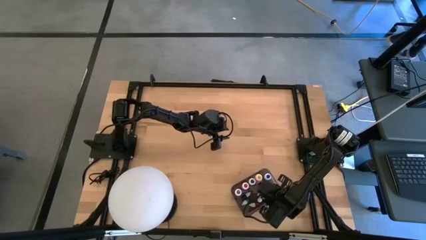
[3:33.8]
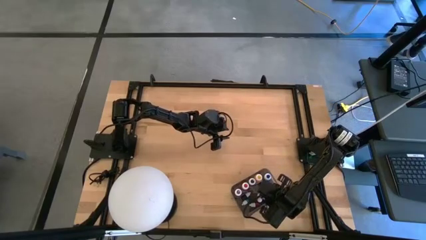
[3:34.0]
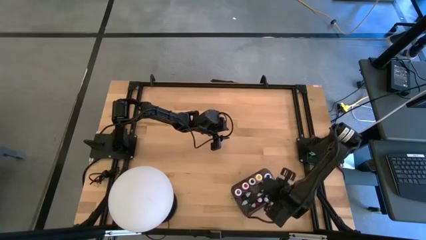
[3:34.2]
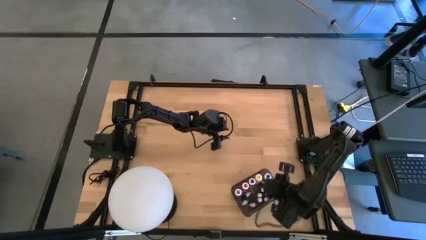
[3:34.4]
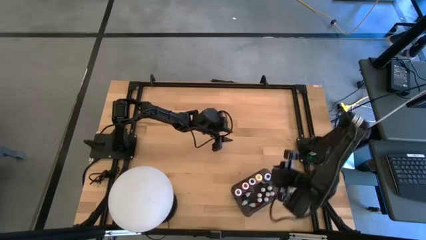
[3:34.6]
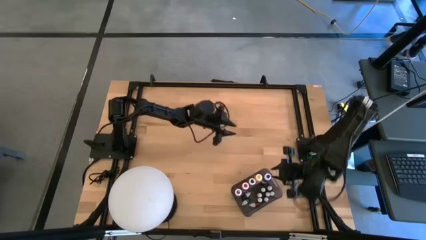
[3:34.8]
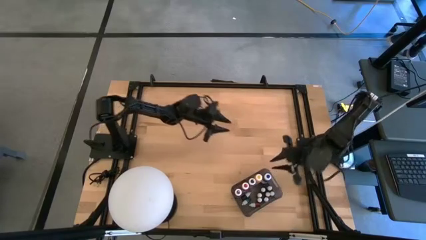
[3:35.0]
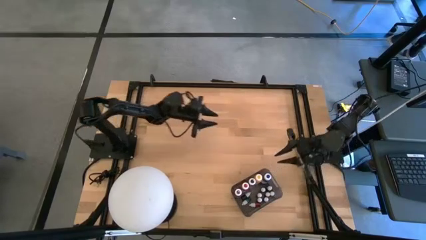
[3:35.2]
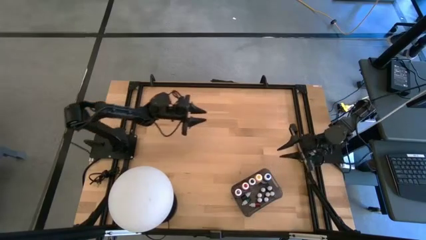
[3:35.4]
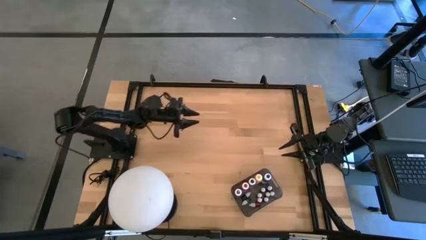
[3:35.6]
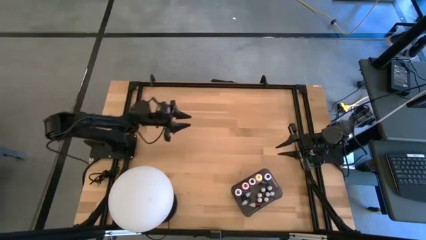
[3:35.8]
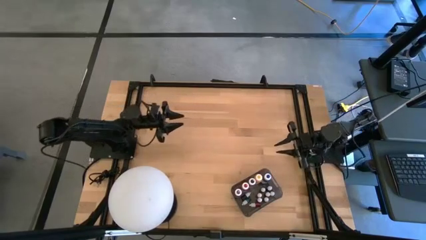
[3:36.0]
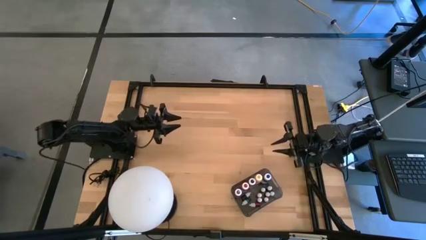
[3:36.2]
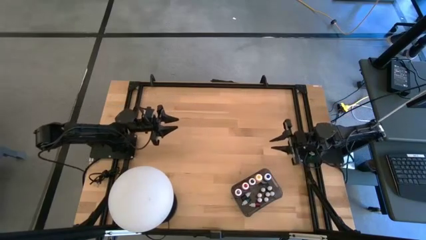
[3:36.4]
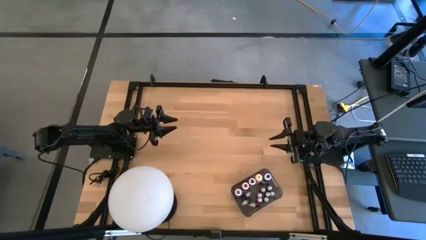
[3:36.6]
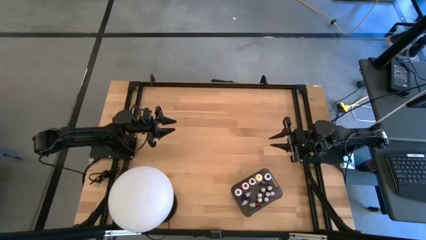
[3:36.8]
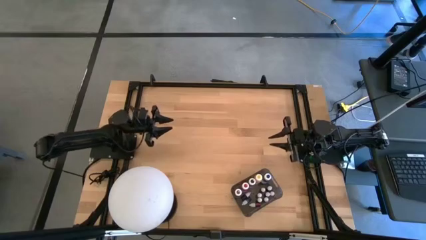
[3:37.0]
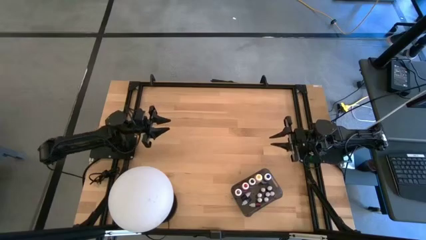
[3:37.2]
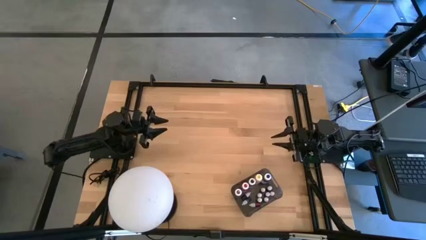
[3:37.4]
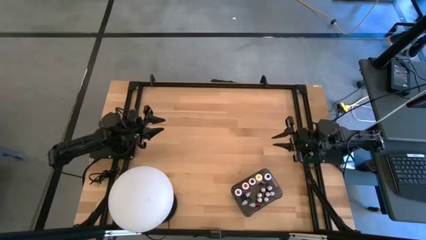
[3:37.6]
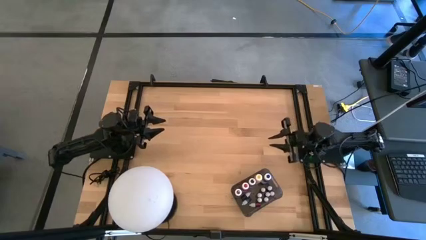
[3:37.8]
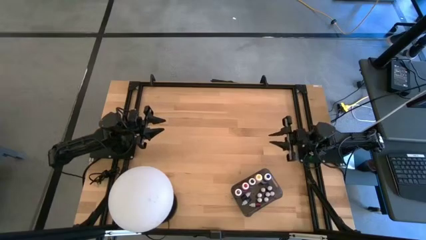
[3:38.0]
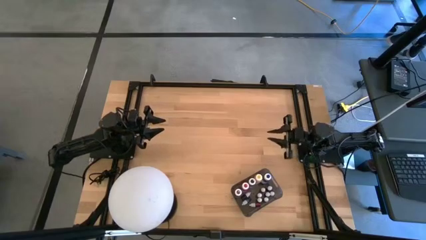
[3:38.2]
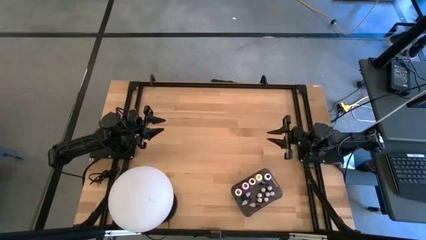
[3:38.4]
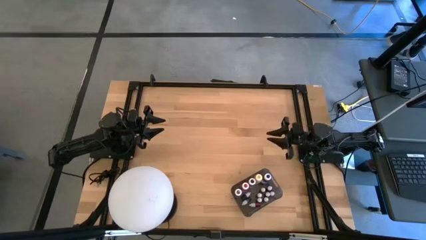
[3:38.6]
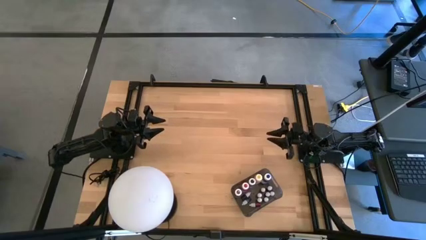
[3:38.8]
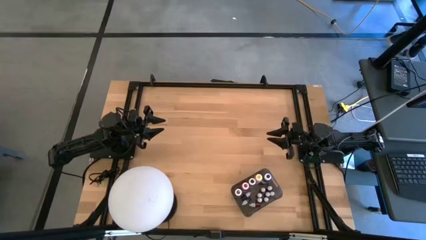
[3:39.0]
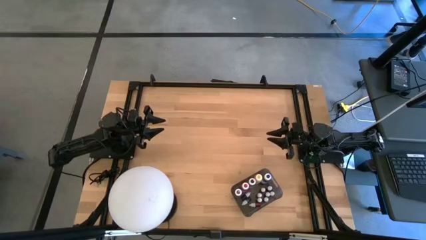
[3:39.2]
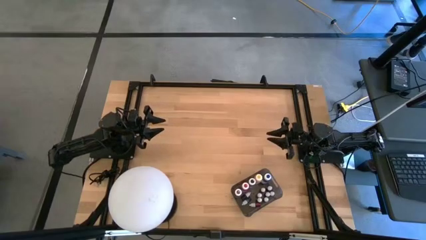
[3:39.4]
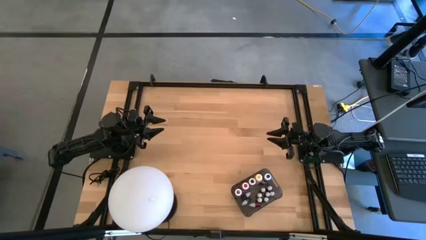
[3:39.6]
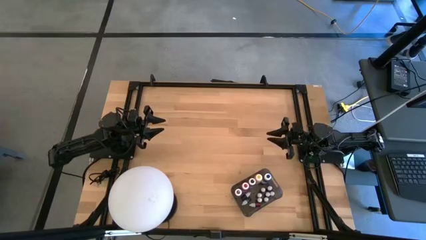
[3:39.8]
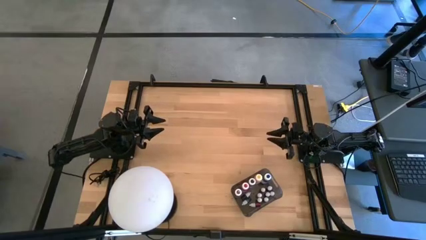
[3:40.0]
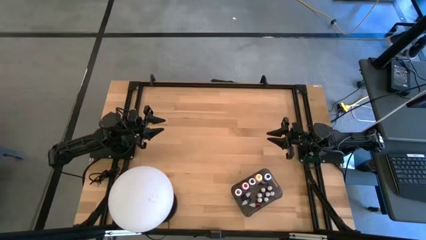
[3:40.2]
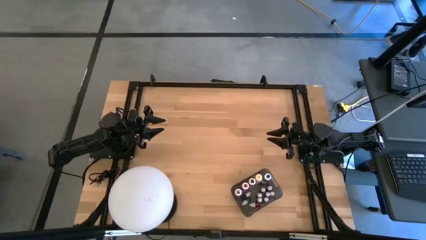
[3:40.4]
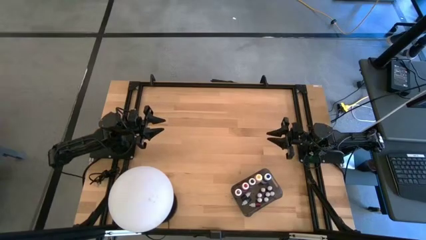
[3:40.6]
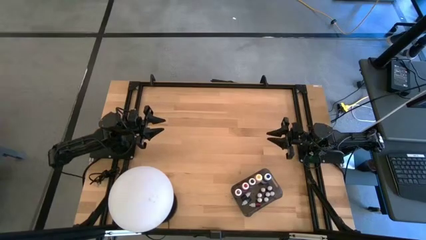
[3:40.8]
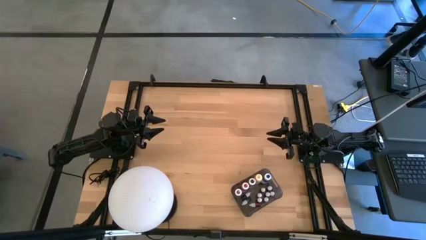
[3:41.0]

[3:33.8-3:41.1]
Task: Pick & Place food coloring
Return to Home Position

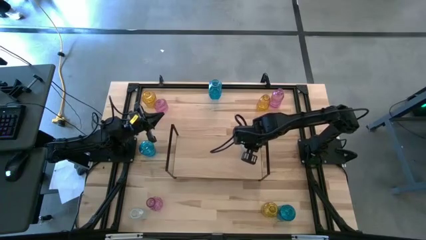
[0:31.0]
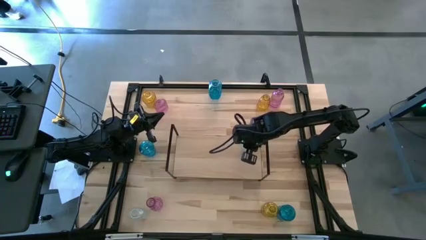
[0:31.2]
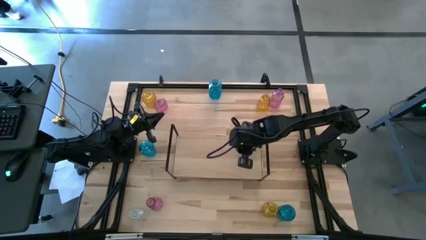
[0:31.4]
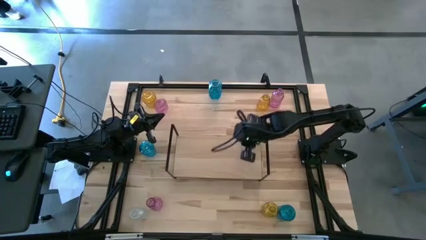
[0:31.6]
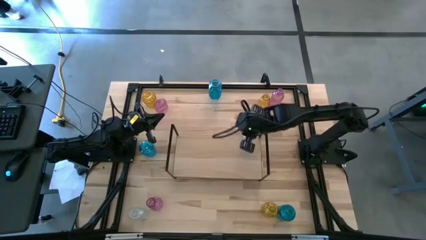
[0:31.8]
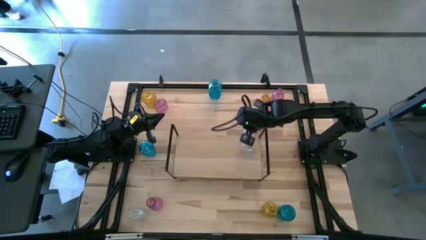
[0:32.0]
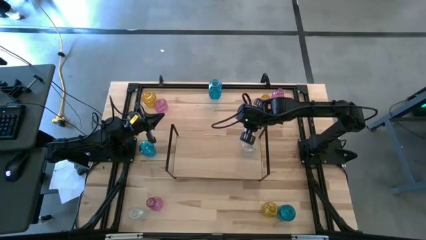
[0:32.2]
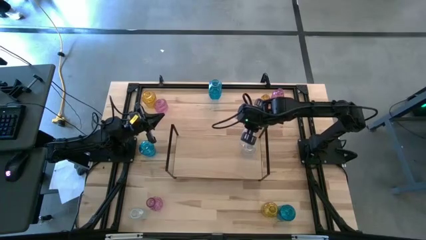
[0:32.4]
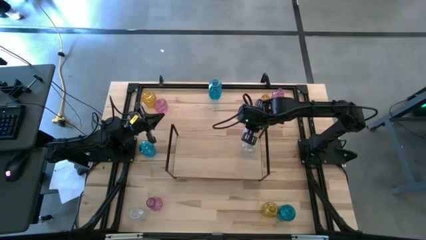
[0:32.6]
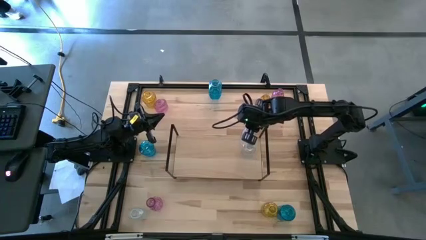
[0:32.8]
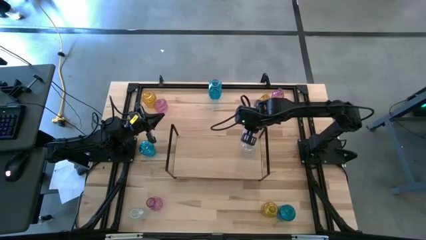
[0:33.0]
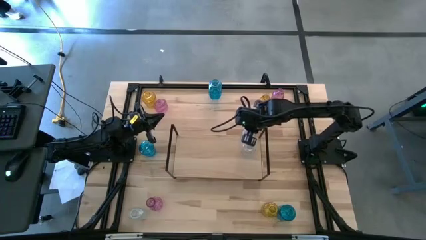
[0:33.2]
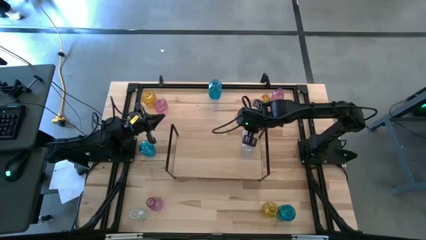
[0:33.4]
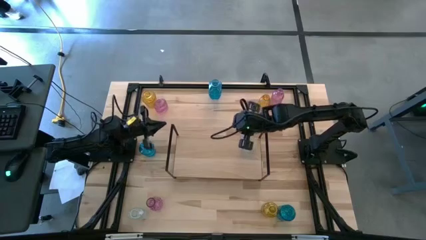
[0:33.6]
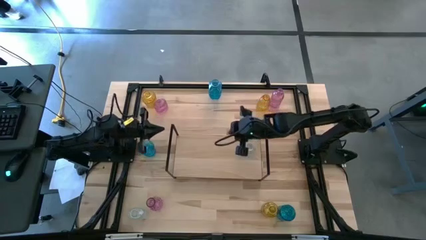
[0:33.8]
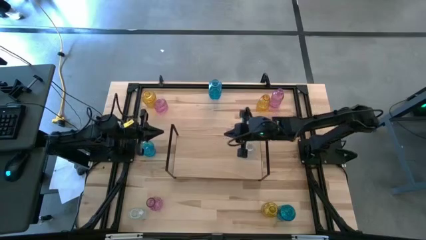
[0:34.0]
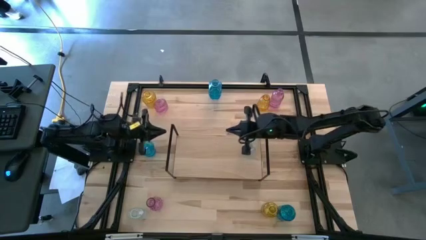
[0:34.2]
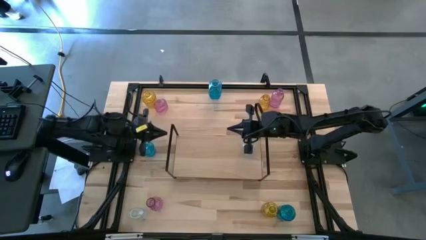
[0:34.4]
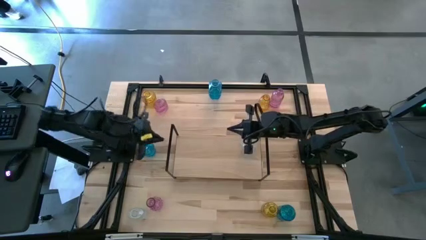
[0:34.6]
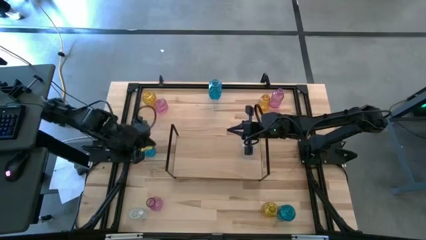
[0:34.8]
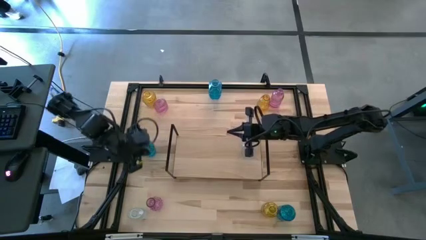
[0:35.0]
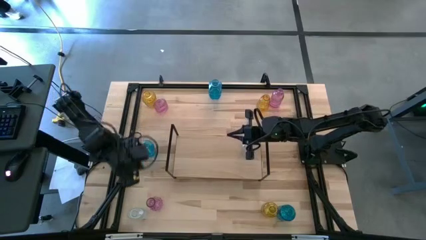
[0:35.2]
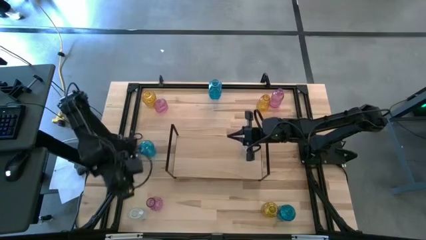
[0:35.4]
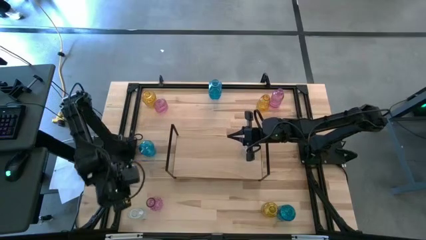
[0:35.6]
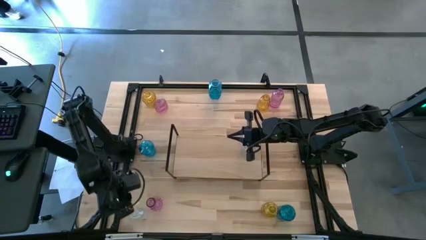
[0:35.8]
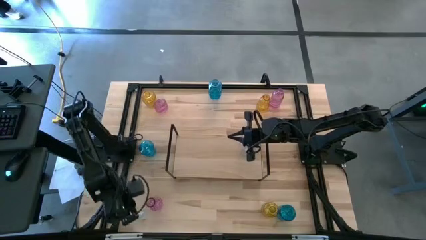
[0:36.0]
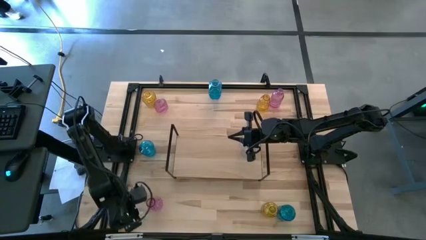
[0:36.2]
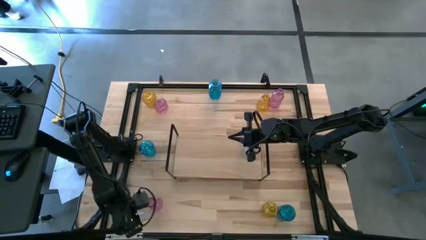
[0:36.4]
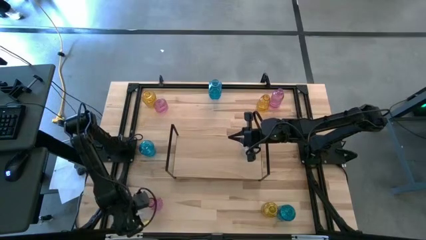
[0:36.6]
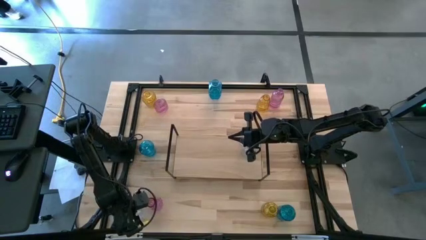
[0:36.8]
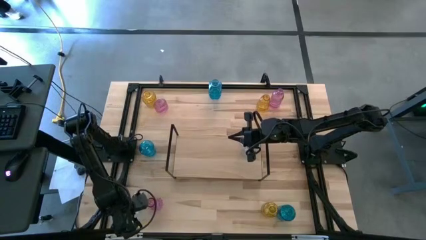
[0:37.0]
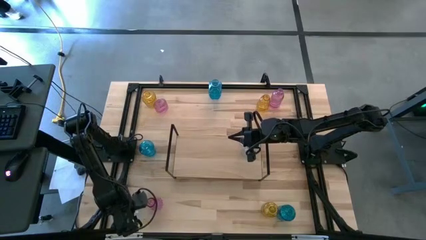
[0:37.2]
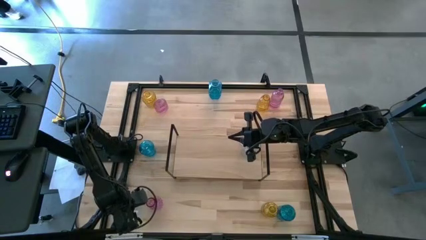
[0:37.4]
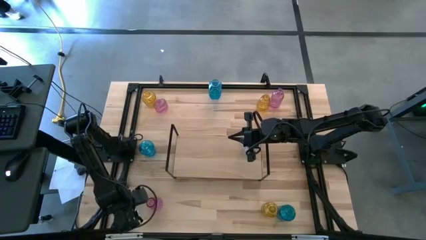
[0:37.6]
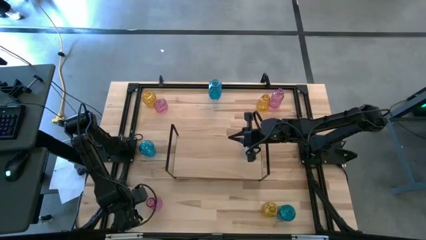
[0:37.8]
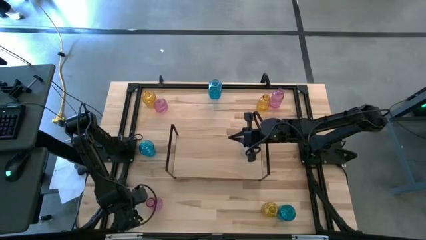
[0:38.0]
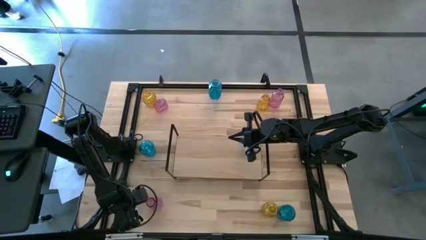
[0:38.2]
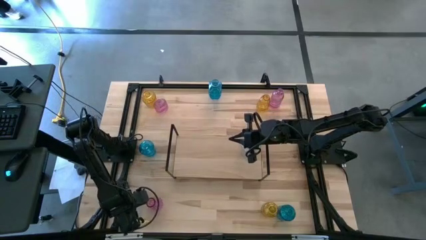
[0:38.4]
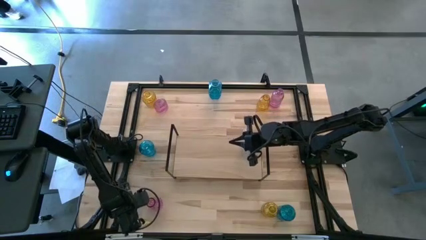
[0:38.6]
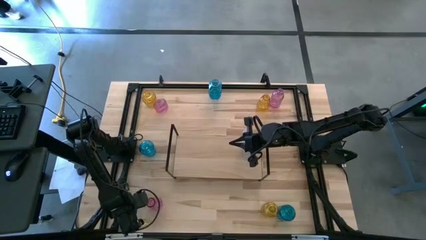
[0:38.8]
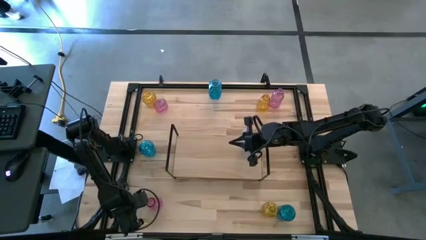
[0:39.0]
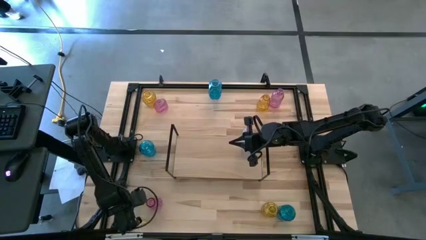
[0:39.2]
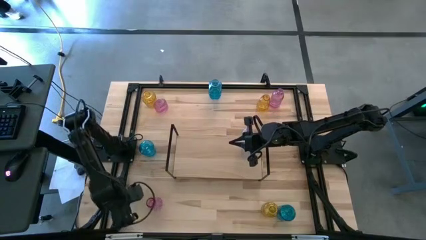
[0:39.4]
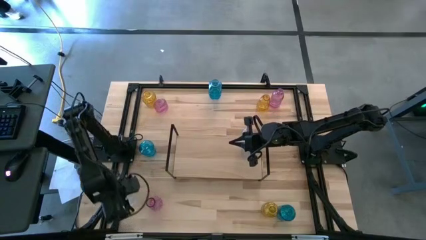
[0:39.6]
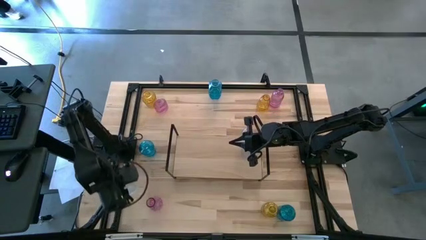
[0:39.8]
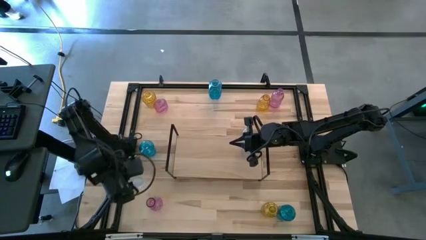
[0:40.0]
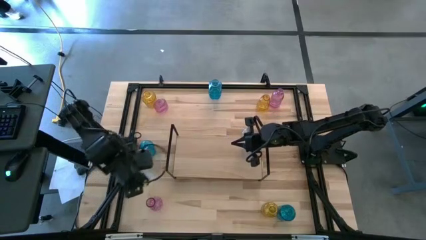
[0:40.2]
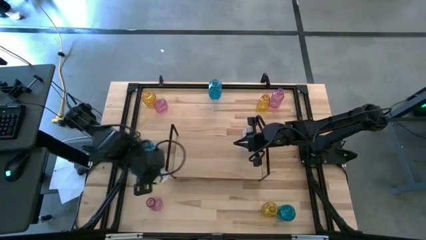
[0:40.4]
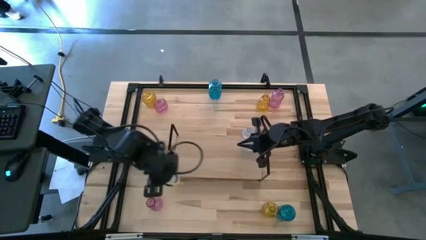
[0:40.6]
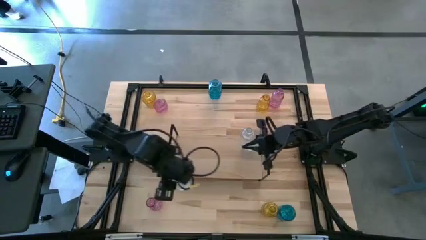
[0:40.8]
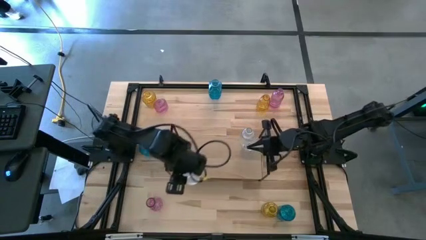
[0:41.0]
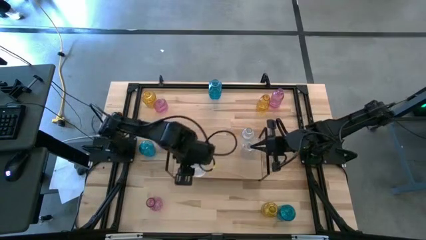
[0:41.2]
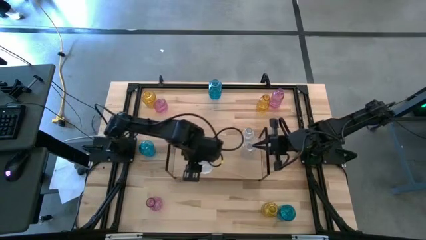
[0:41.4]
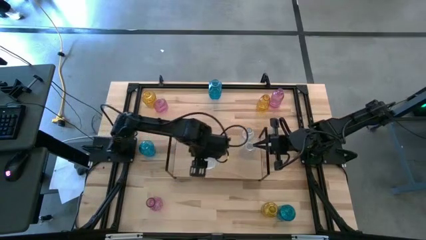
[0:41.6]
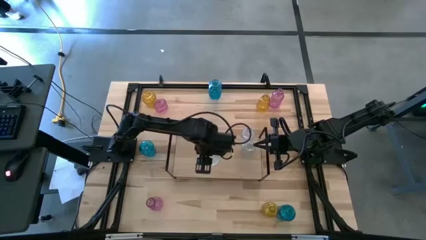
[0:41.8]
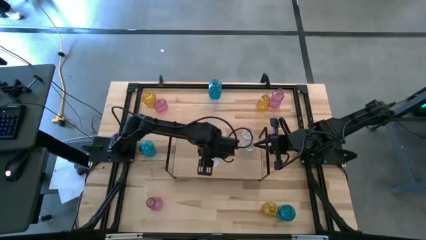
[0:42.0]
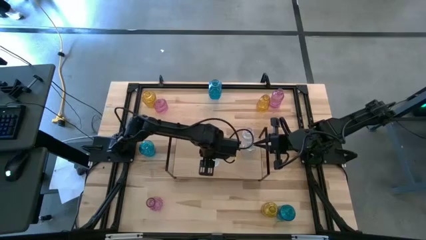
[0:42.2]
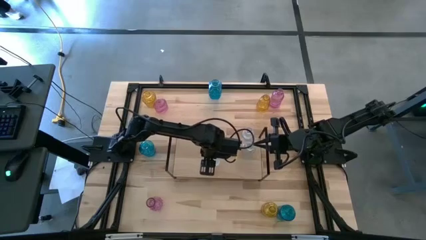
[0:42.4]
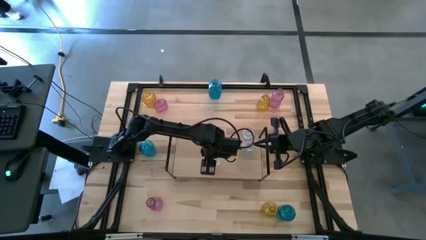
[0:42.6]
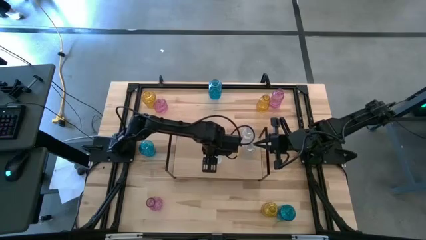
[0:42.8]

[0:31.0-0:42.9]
Task: sort vases onto shelf
Put the transparent vase on the shelf aligned with the other transparent vases
